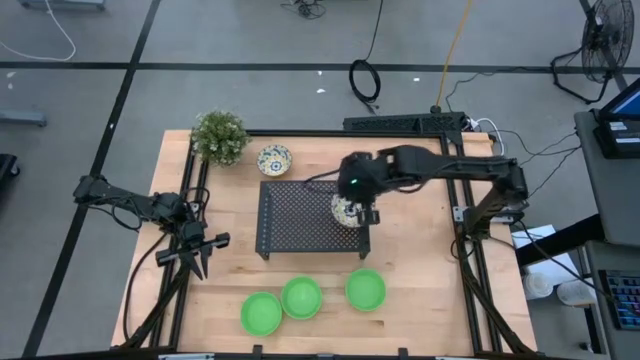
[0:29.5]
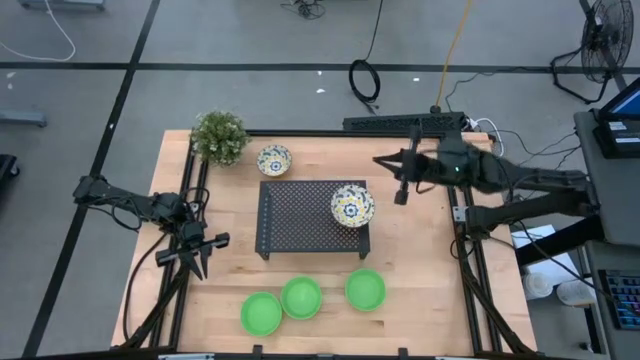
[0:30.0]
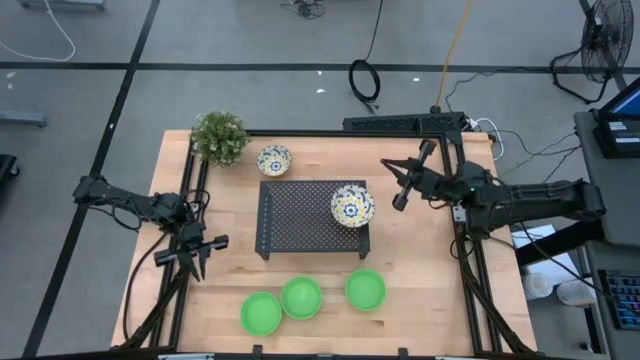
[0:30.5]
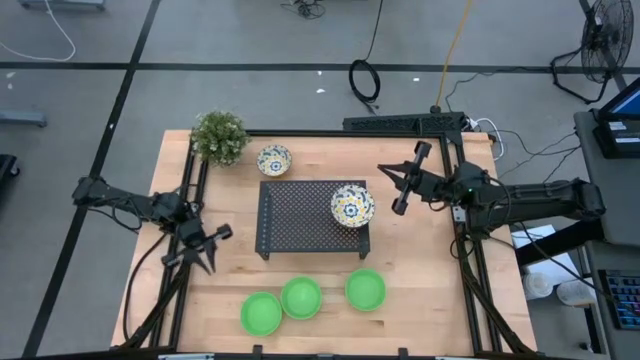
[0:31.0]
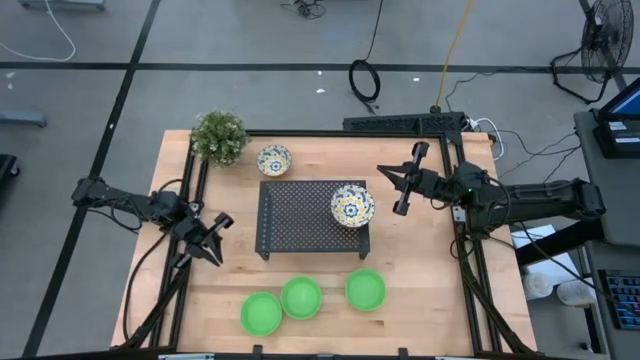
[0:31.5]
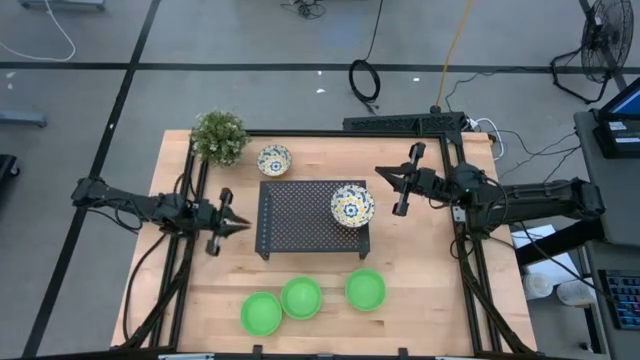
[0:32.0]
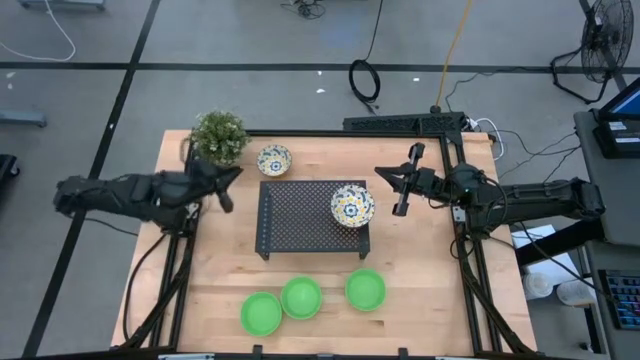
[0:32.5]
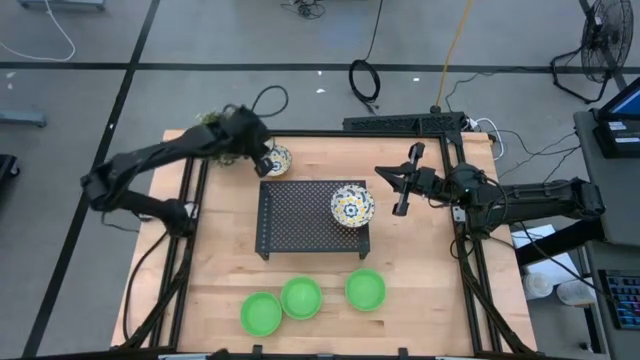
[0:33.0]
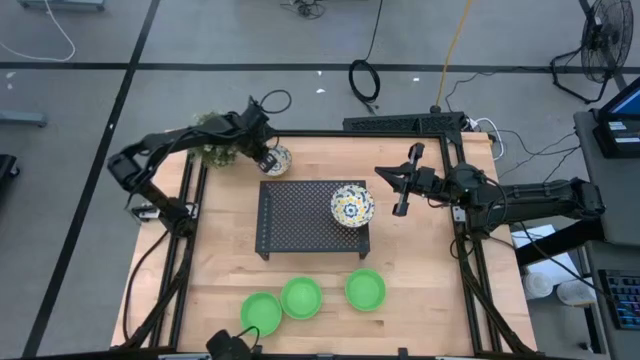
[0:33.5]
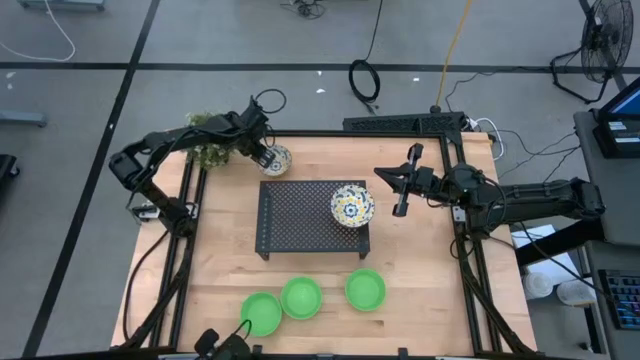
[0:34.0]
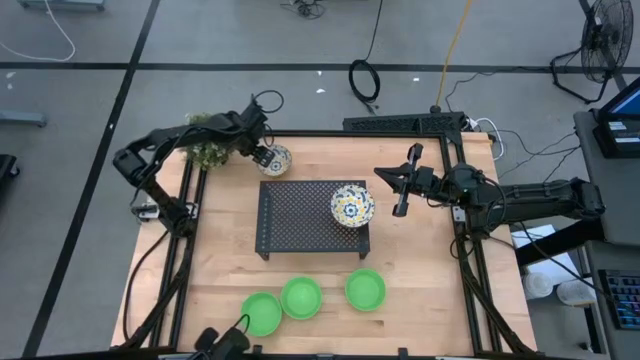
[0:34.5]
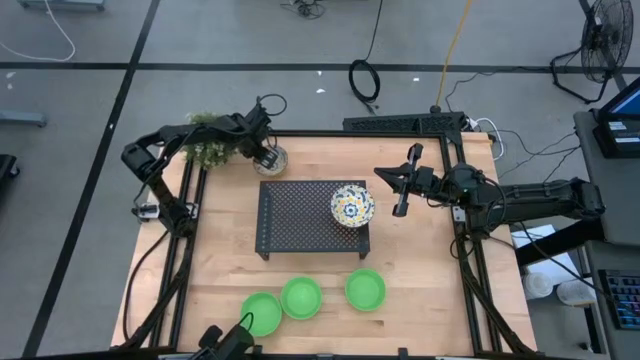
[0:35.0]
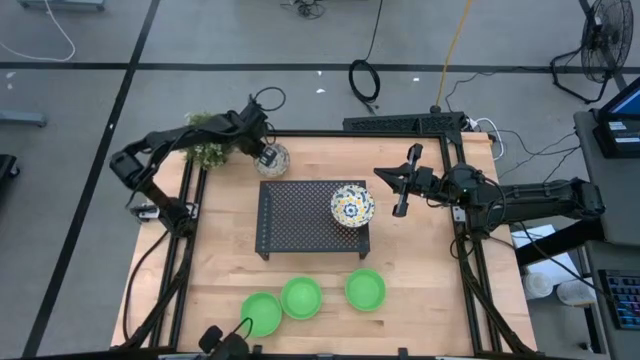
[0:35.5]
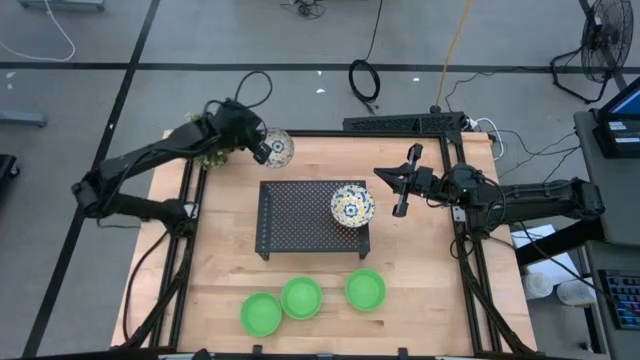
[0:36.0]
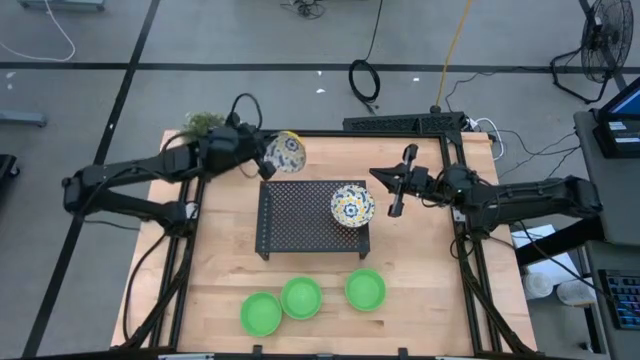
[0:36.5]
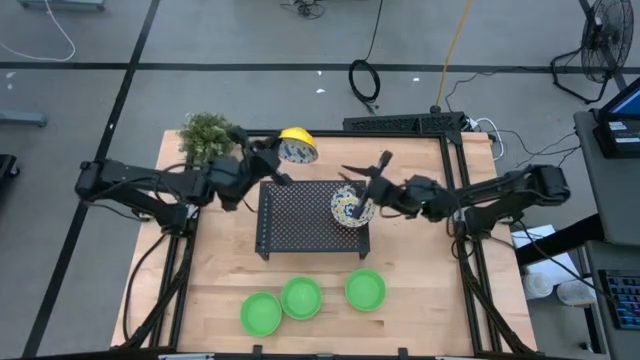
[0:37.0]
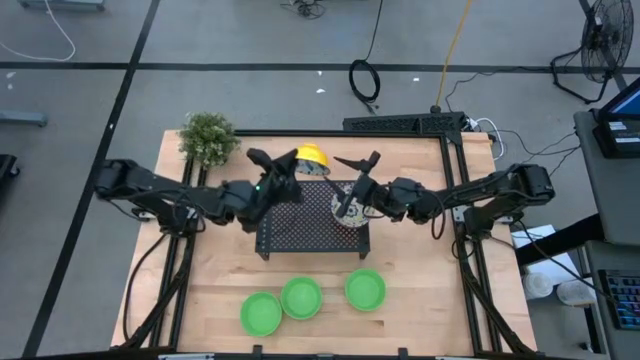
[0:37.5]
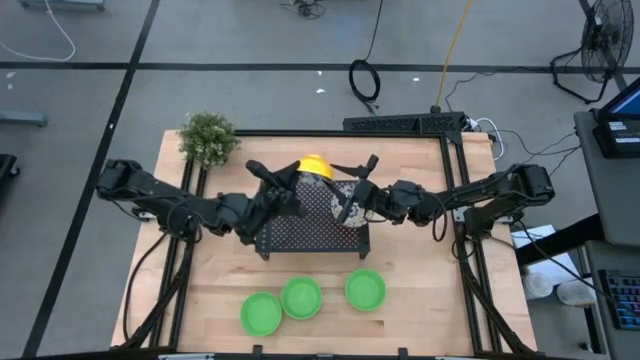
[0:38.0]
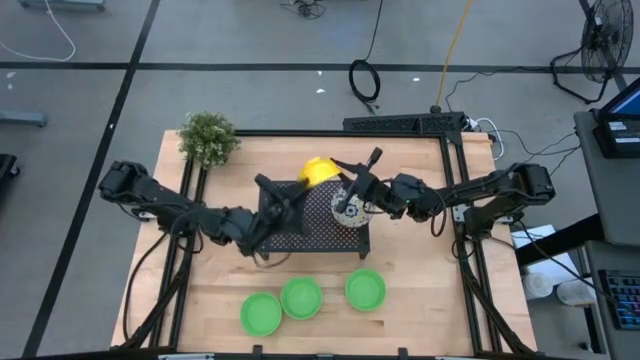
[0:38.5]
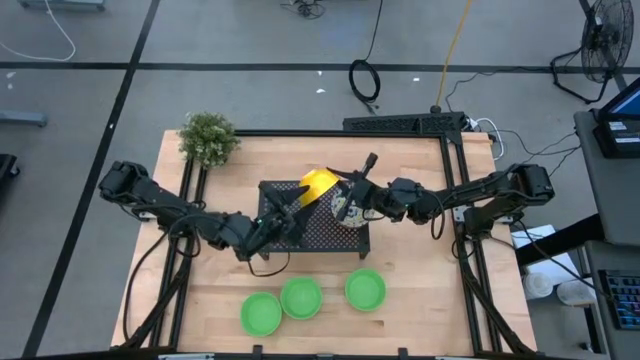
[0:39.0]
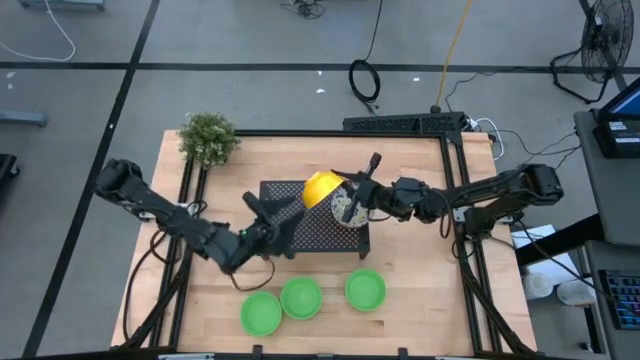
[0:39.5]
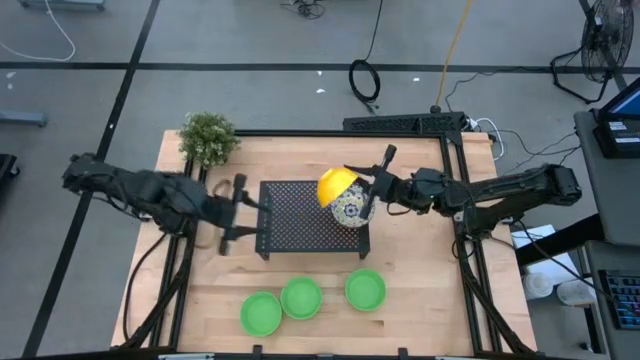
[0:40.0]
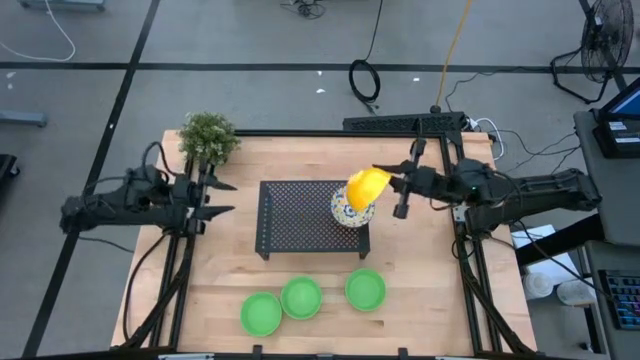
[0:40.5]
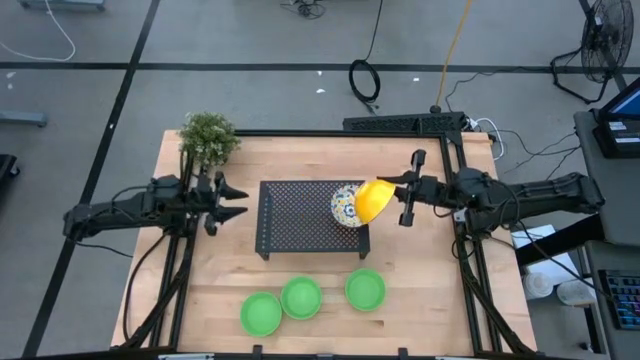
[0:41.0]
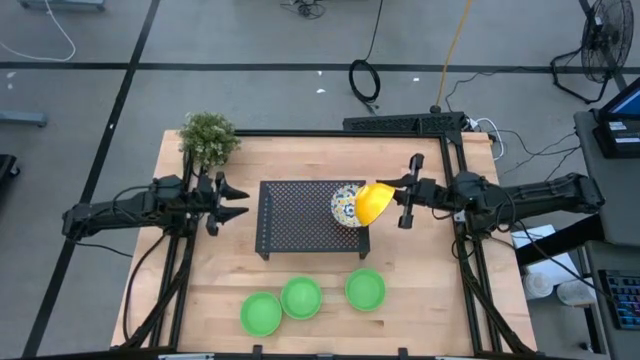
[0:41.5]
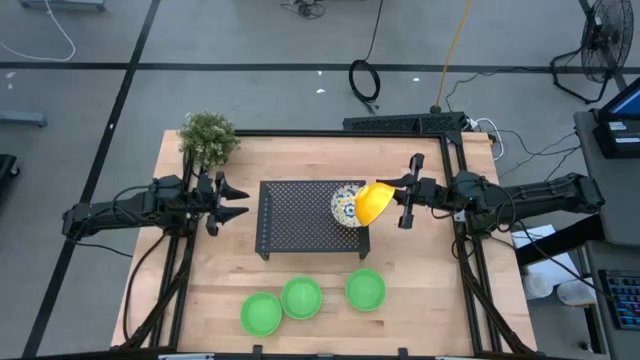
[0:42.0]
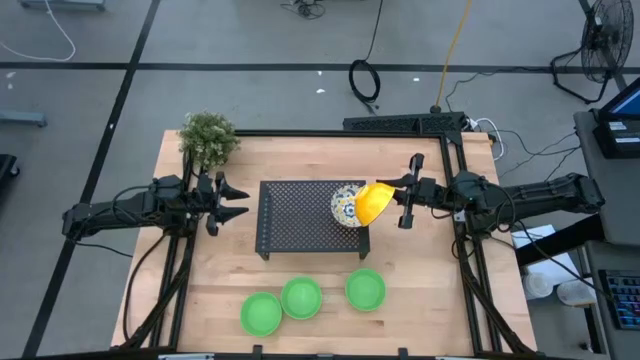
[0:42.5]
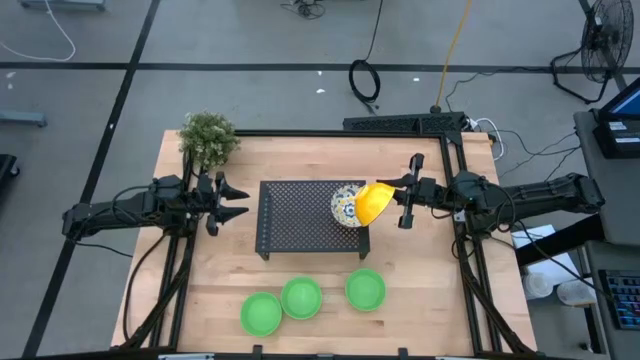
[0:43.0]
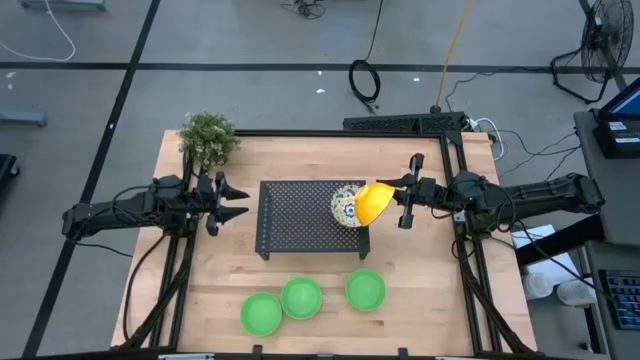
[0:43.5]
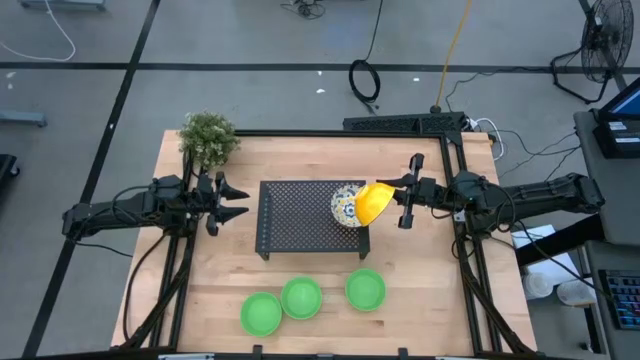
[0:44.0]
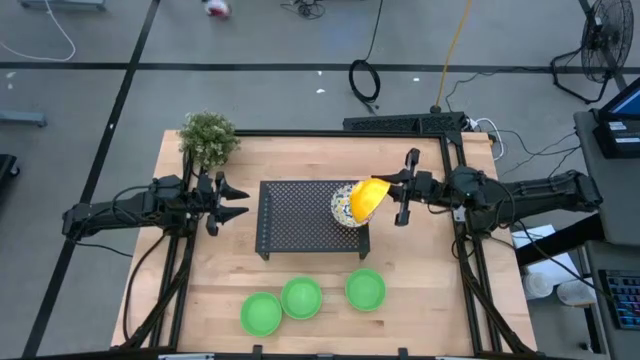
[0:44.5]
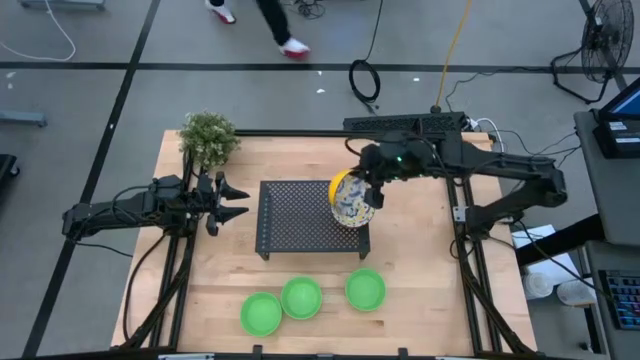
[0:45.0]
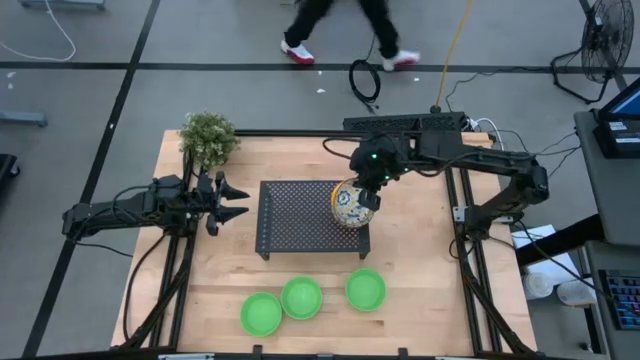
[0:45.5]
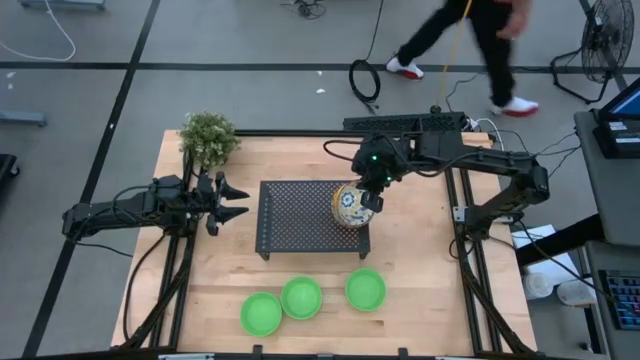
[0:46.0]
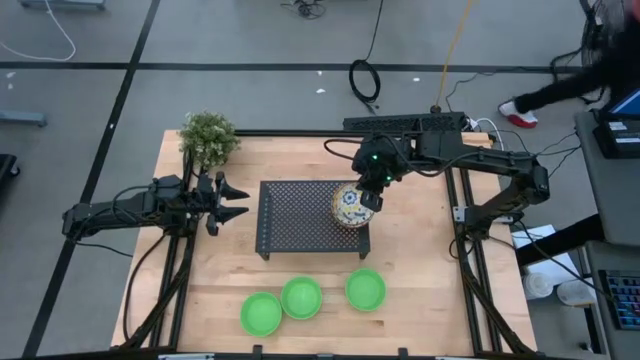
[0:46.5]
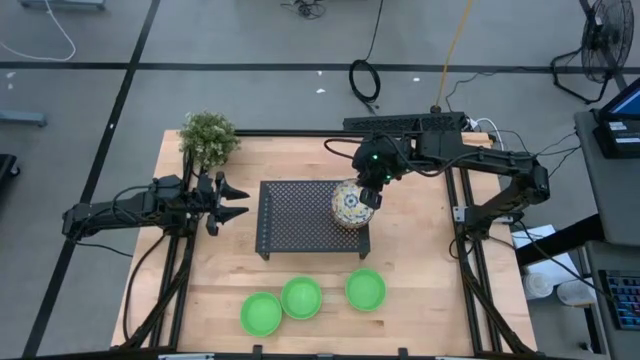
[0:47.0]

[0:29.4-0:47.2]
Task: Pick & Place Mini bowls
Stack the white patterned bowl on top of the white patterned bowl on the shelf
